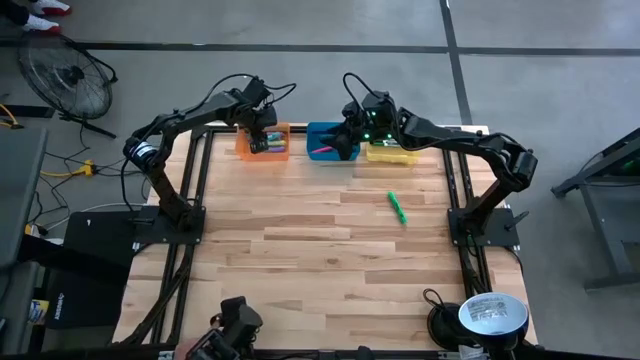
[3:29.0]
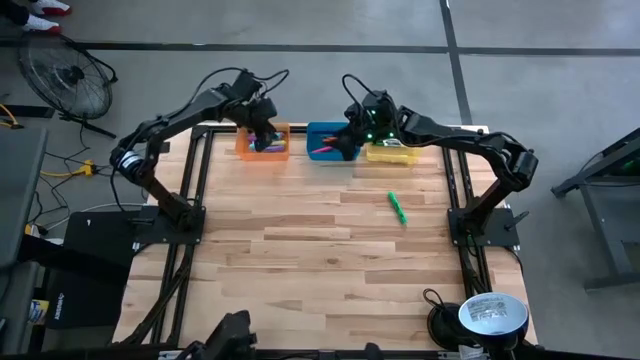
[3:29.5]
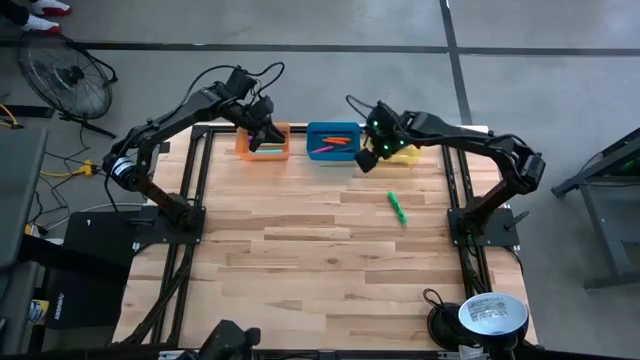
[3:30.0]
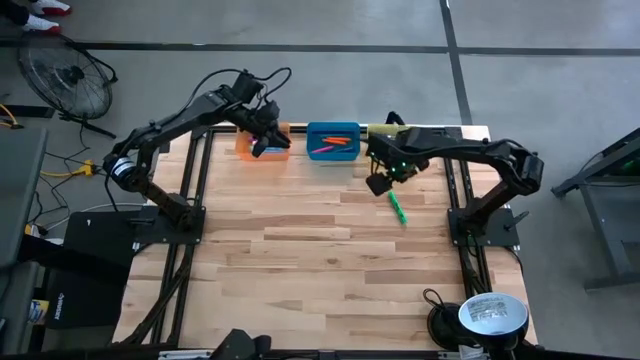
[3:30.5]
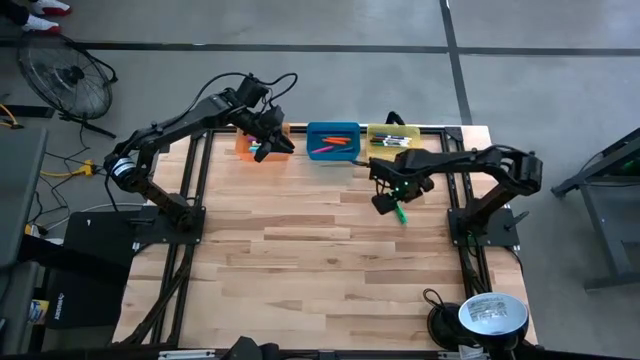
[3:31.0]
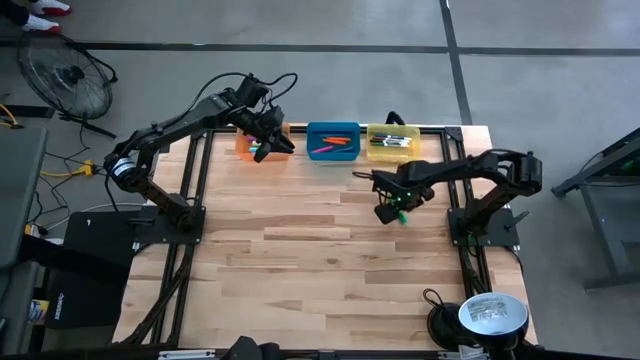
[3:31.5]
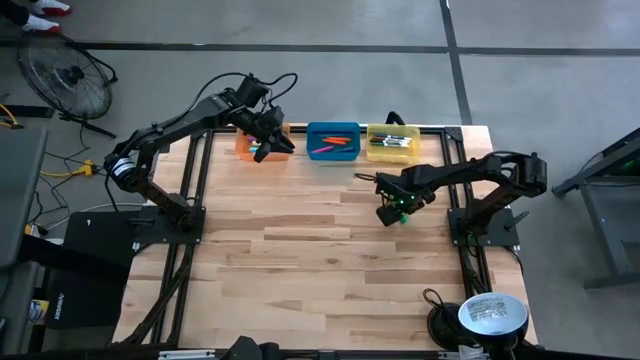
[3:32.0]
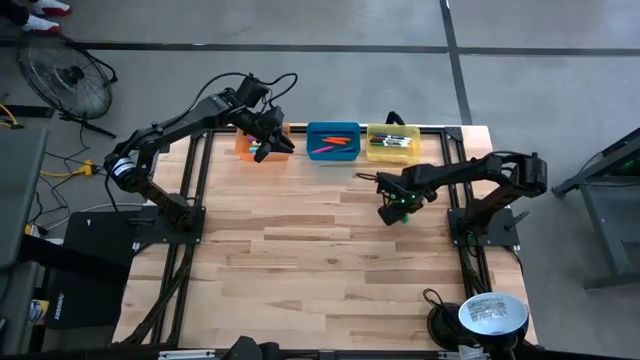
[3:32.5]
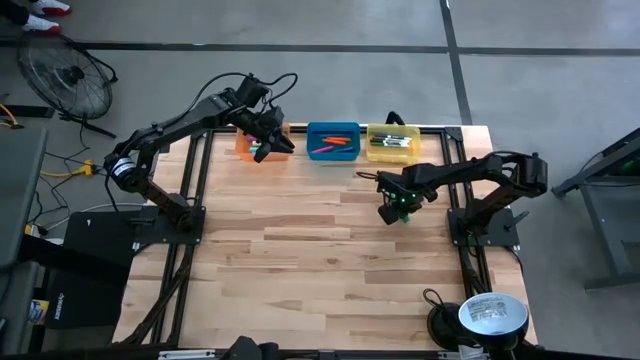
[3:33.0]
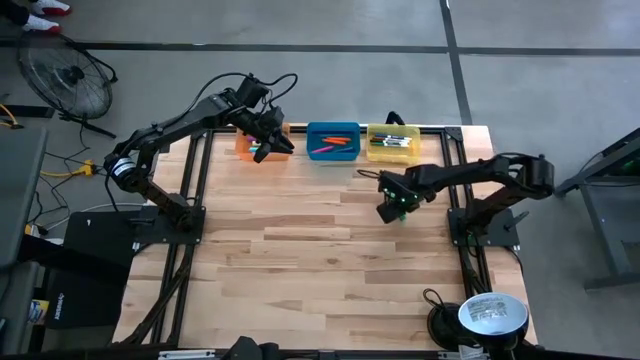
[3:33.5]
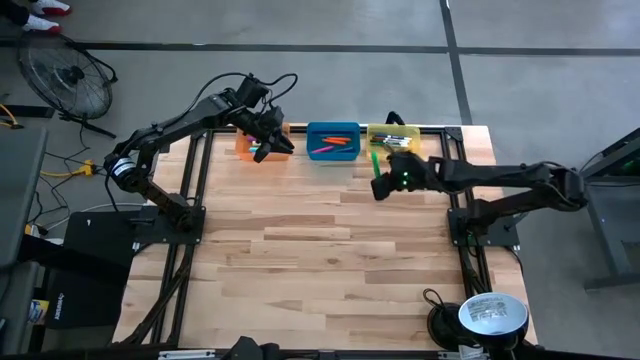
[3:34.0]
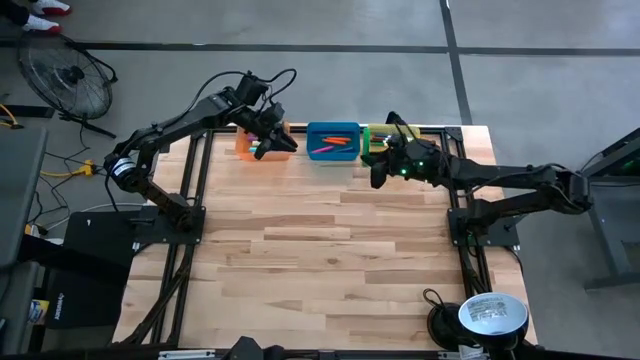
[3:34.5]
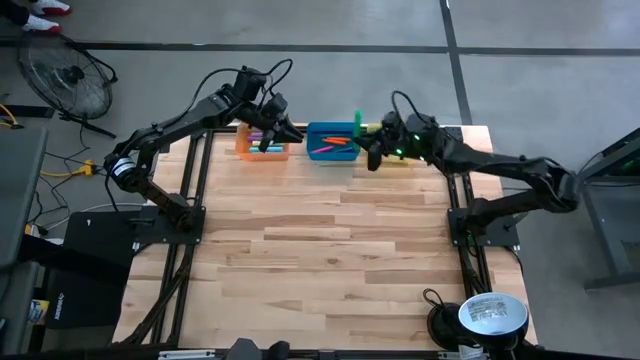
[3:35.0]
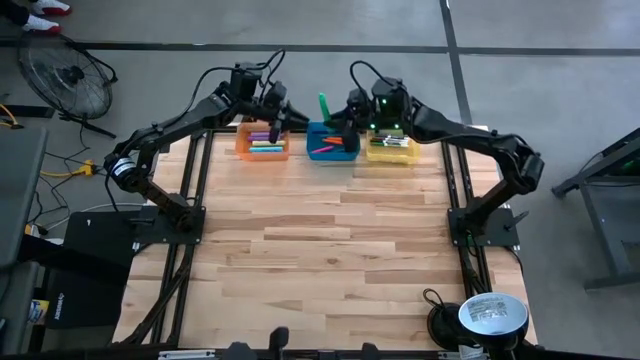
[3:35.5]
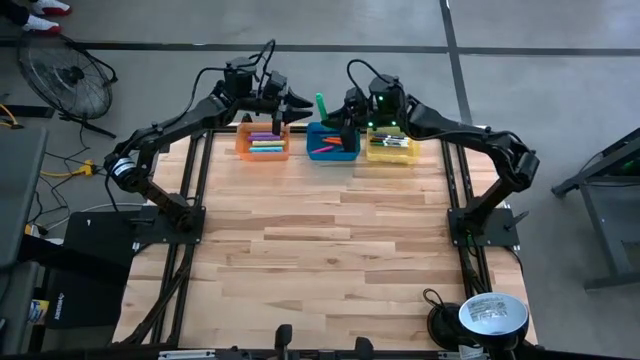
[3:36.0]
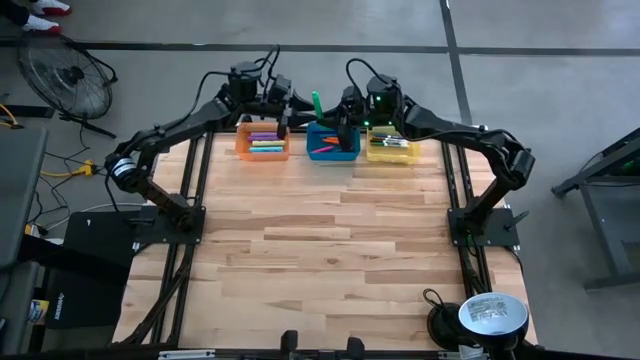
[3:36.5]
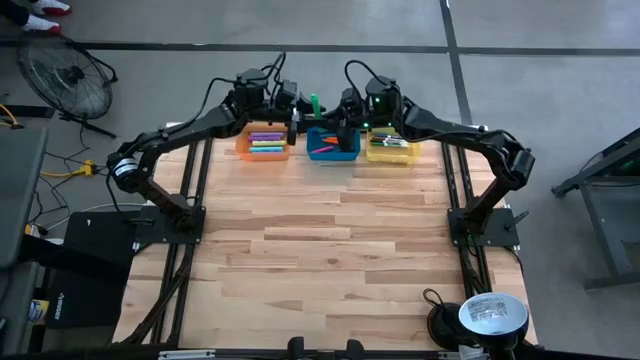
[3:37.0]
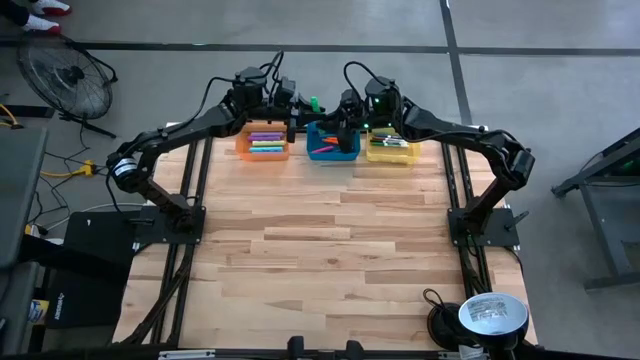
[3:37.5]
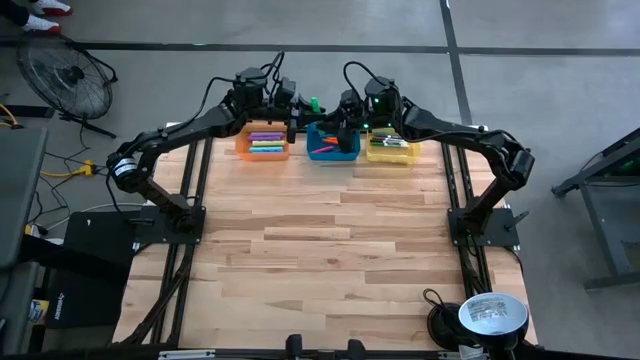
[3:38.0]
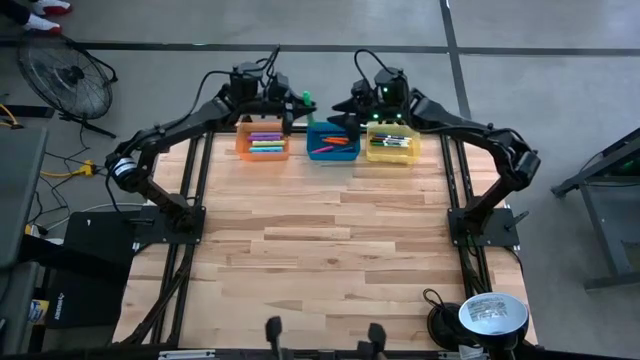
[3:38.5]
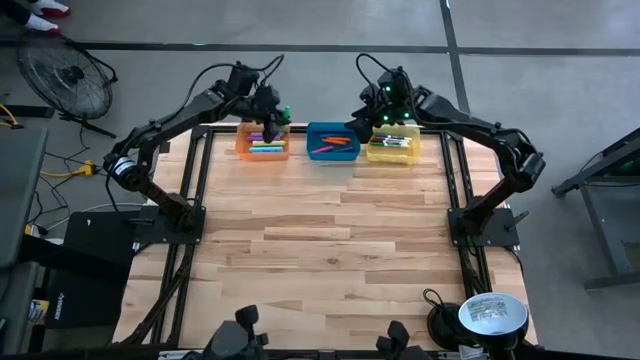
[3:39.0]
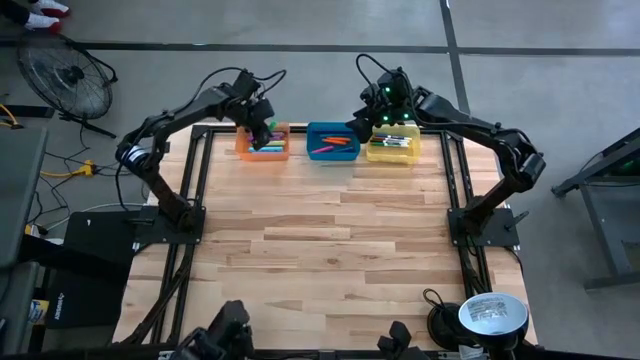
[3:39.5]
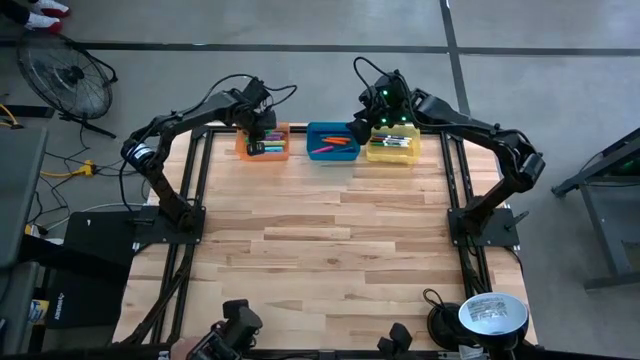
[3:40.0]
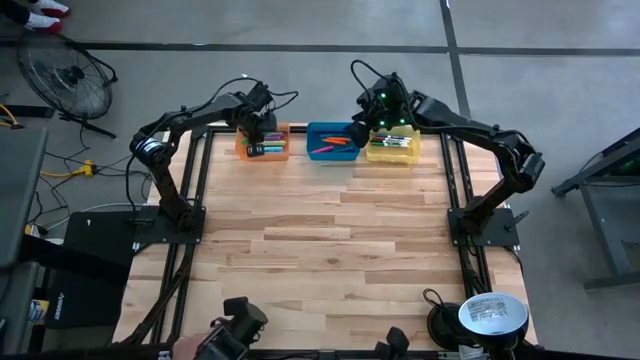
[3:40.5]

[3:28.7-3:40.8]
Task: Pick & Place Markers
Put the green highlighter into the orange bin

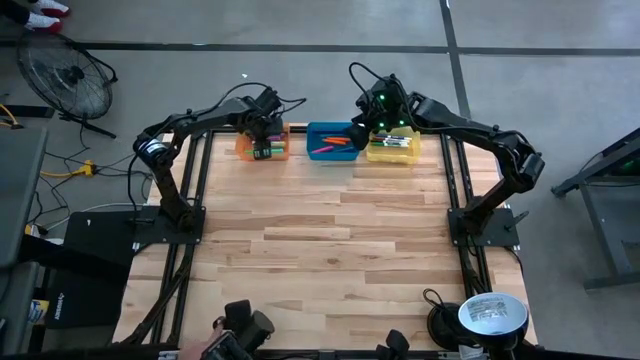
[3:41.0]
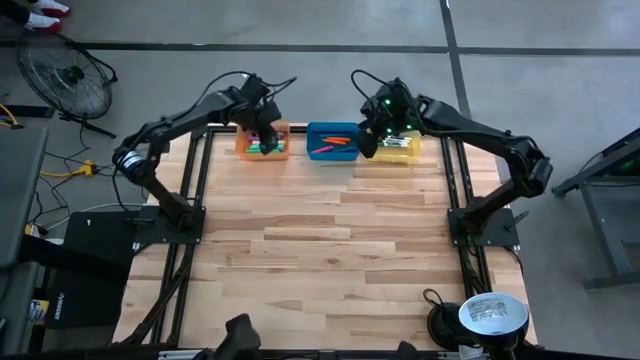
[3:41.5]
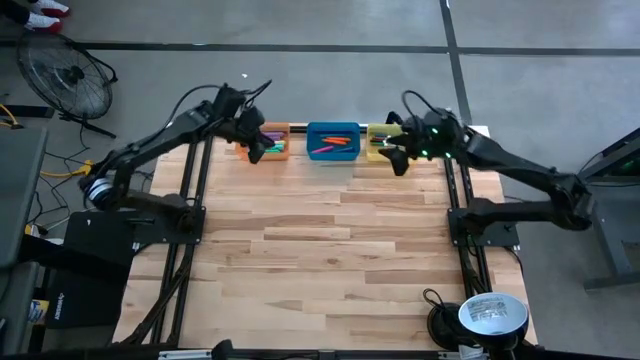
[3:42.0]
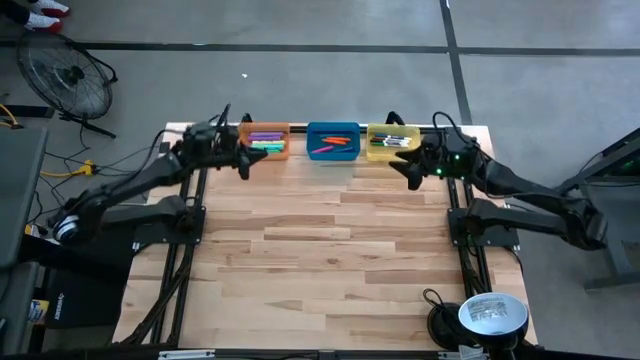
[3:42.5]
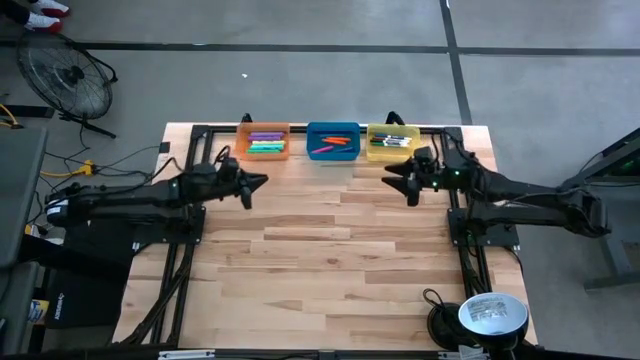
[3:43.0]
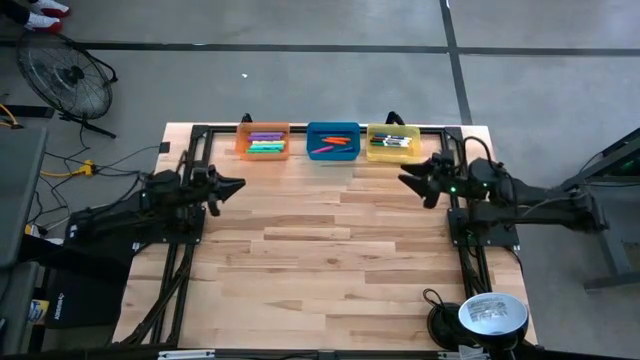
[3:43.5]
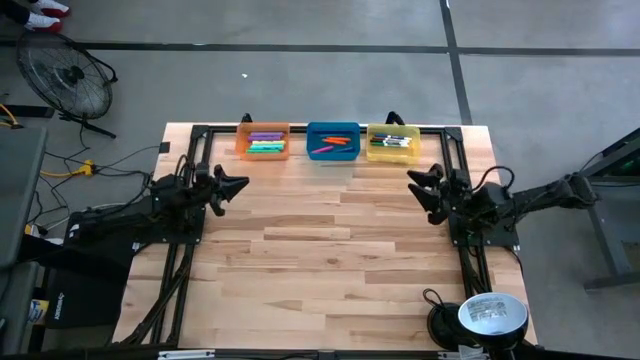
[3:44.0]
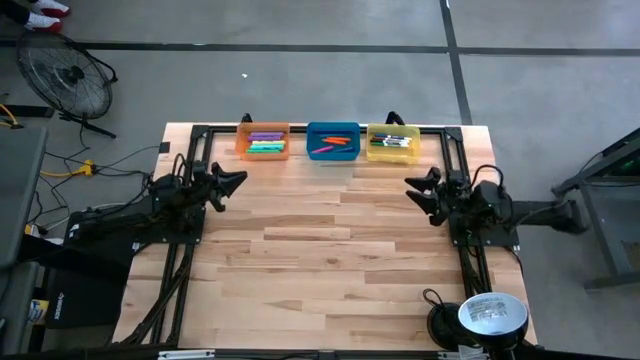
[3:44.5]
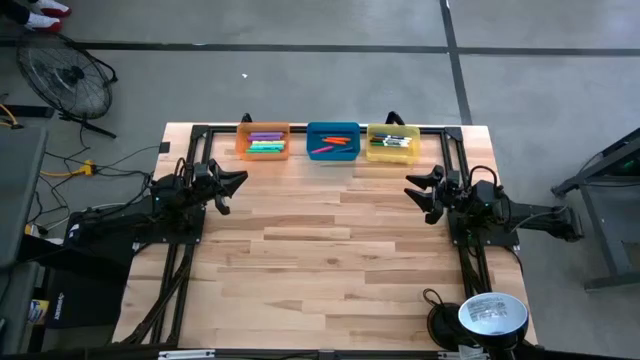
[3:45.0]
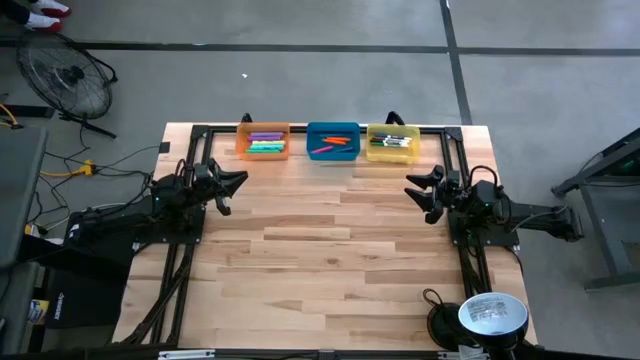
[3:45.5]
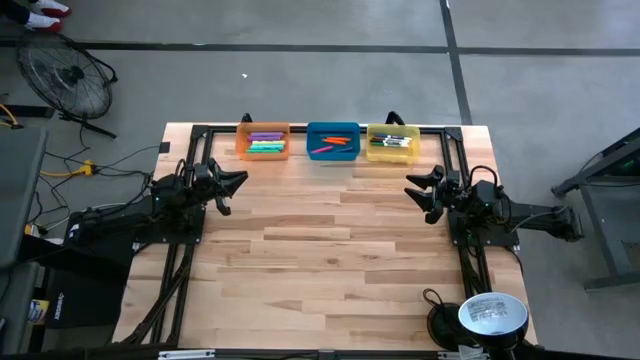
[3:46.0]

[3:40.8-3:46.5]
Return to Home Position

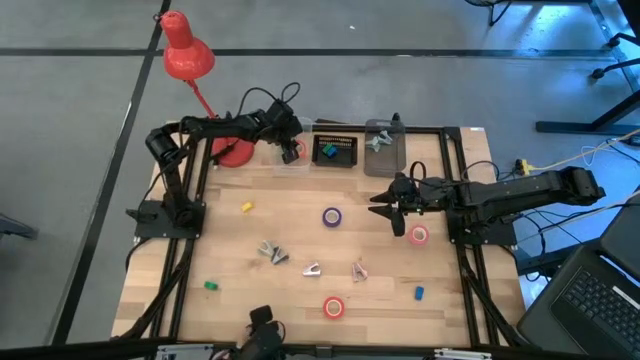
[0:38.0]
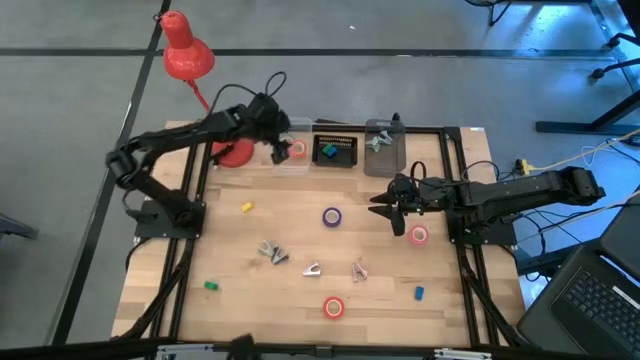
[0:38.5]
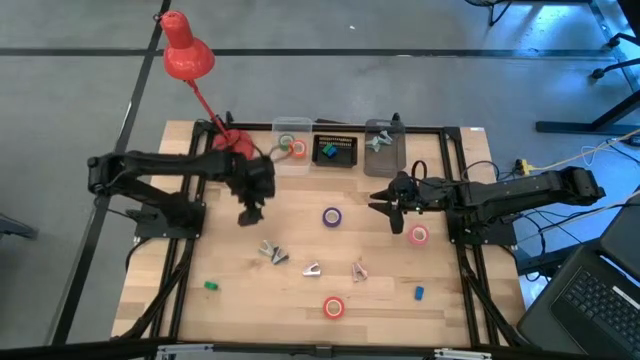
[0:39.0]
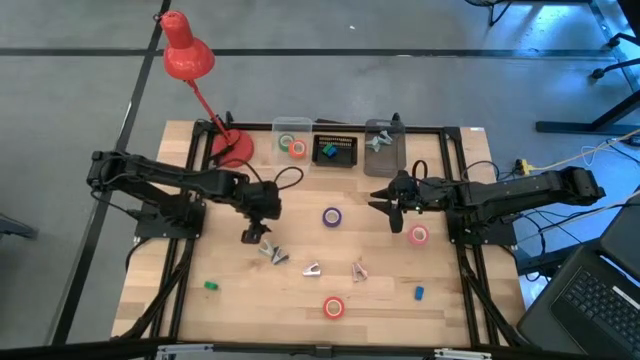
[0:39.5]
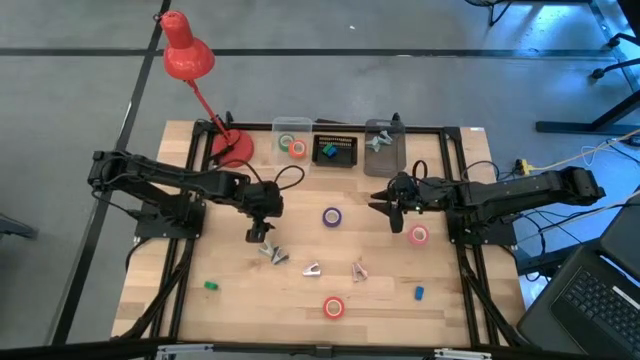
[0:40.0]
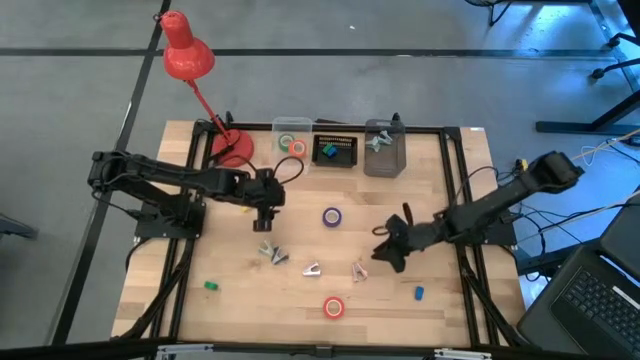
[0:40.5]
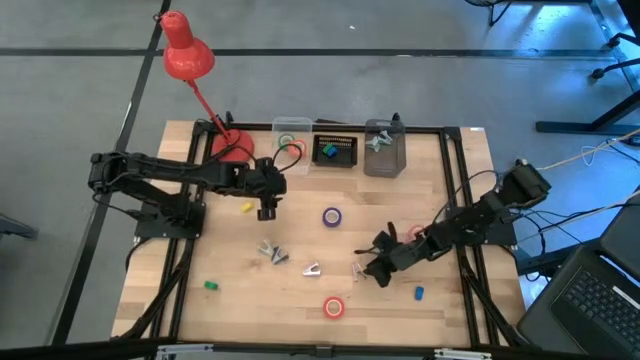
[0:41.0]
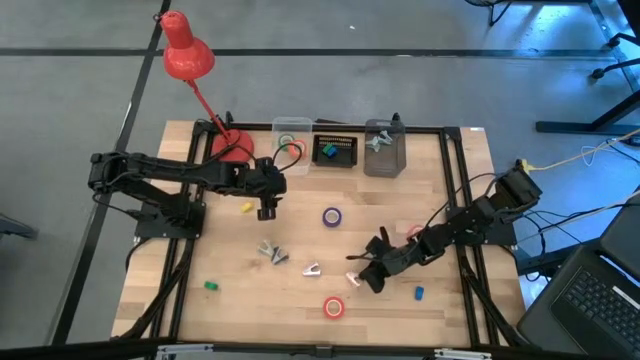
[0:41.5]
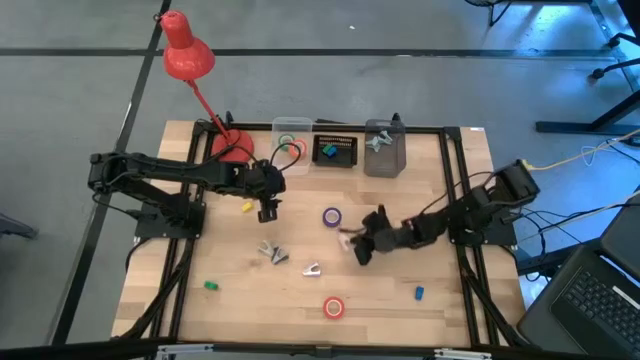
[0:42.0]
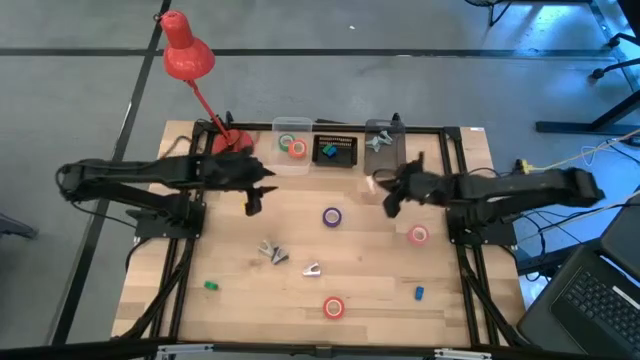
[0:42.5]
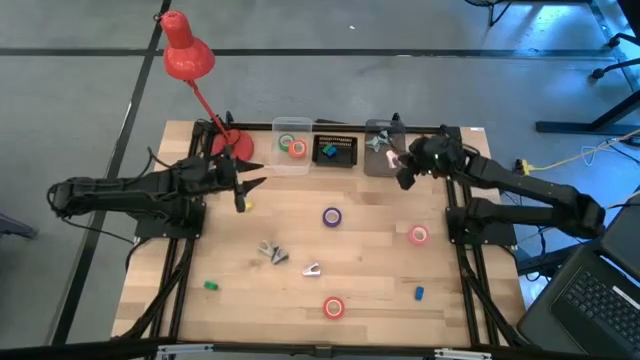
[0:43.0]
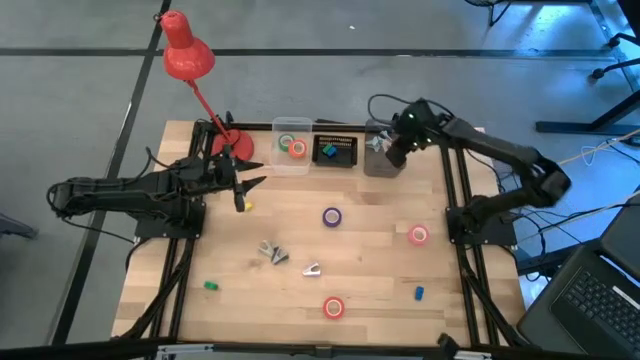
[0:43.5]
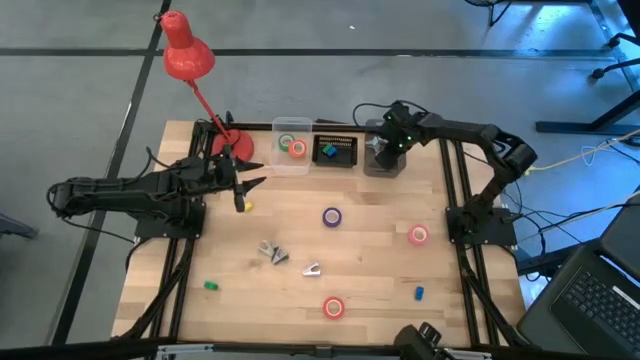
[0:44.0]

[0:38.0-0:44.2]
Task: Pick and place Stapler, Stapler remover, tape
Put the pink staple remover into the right black bin
